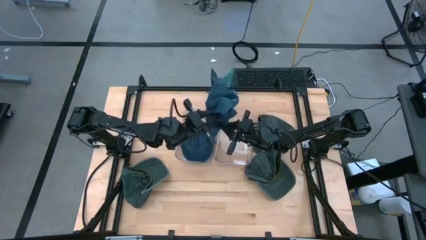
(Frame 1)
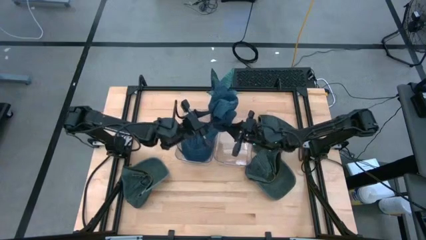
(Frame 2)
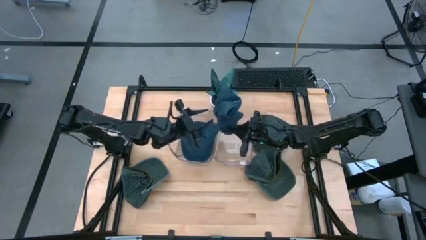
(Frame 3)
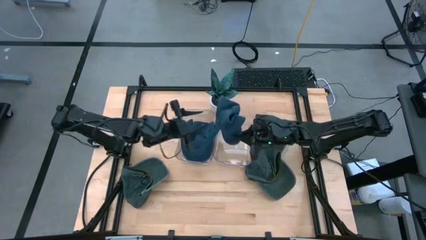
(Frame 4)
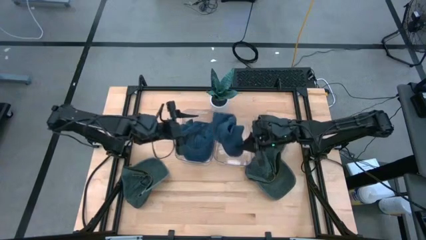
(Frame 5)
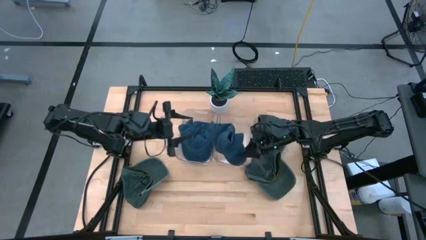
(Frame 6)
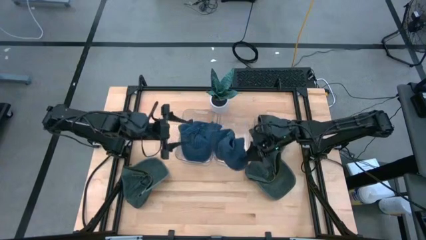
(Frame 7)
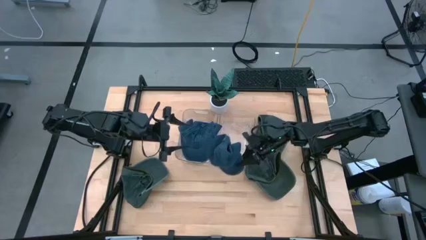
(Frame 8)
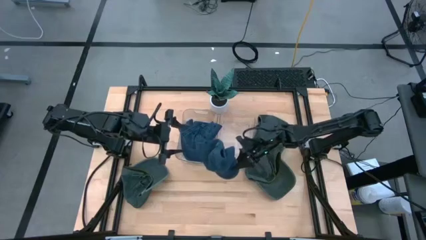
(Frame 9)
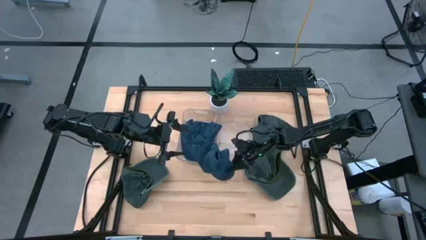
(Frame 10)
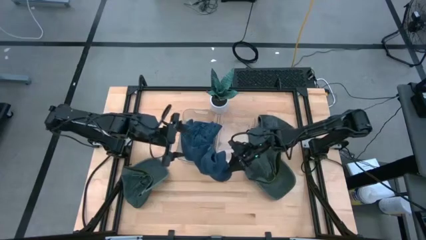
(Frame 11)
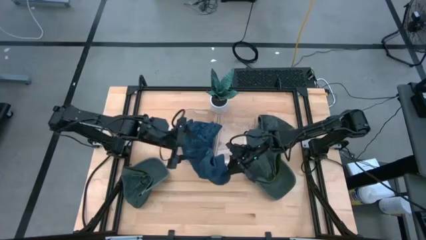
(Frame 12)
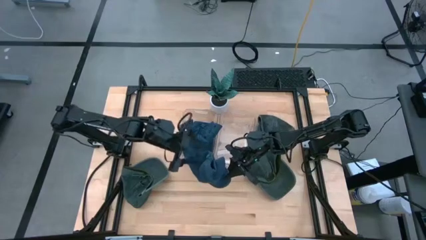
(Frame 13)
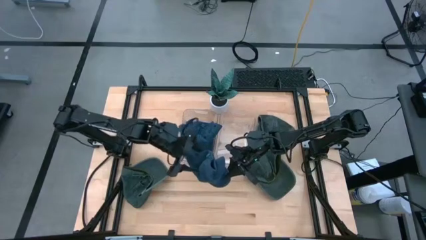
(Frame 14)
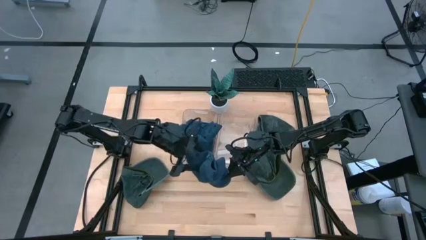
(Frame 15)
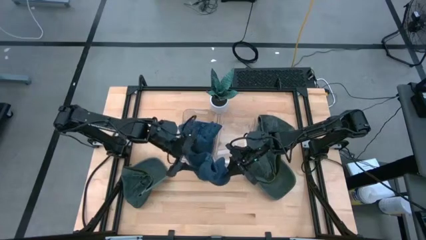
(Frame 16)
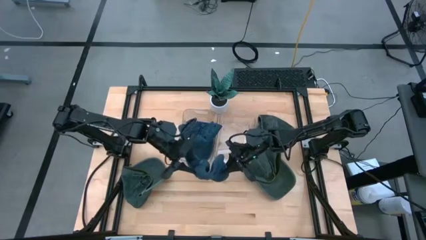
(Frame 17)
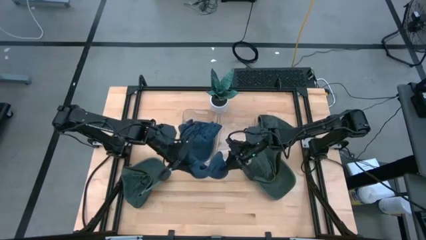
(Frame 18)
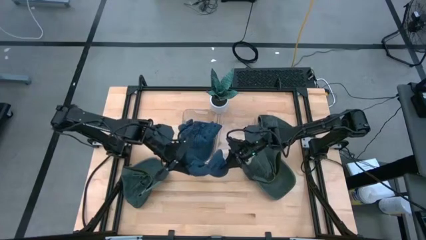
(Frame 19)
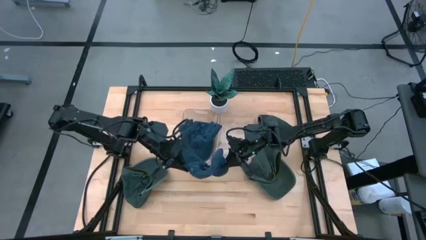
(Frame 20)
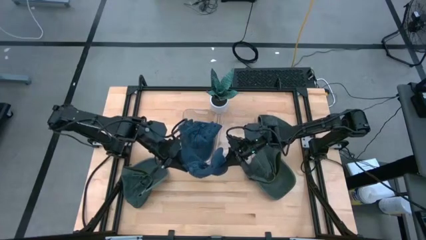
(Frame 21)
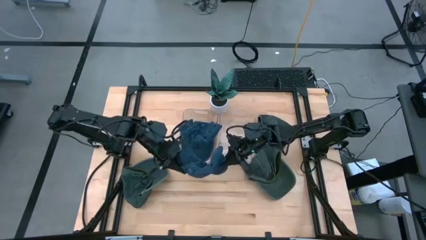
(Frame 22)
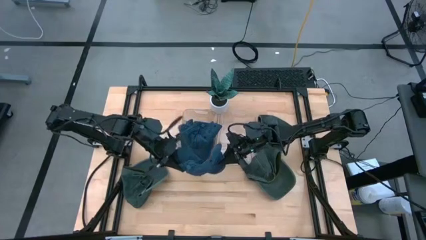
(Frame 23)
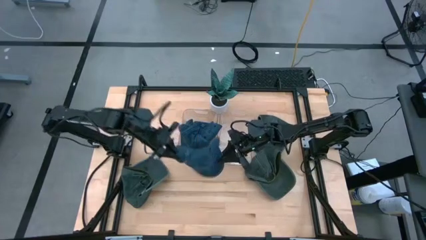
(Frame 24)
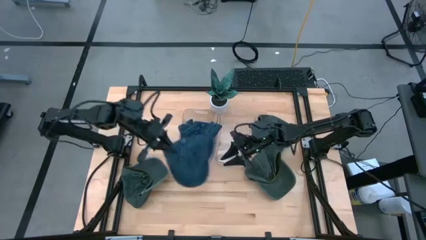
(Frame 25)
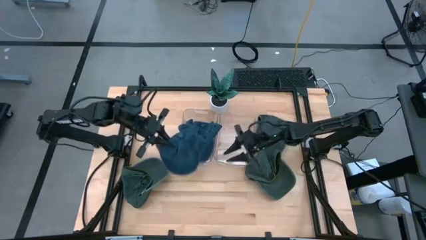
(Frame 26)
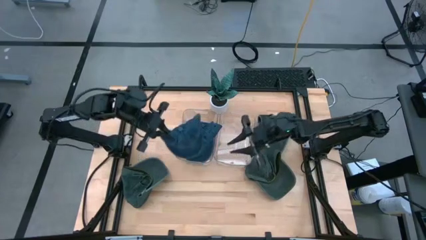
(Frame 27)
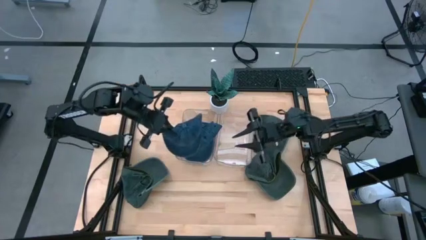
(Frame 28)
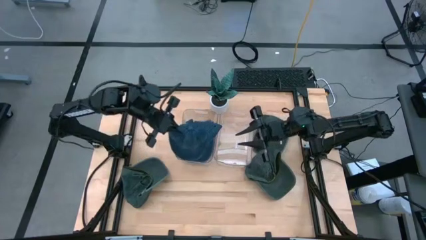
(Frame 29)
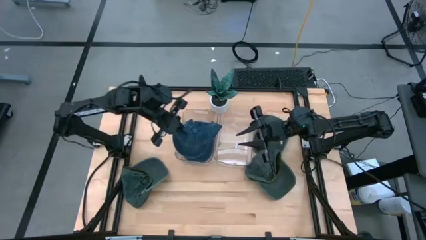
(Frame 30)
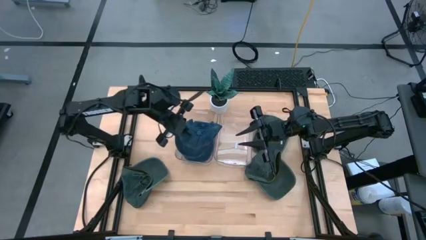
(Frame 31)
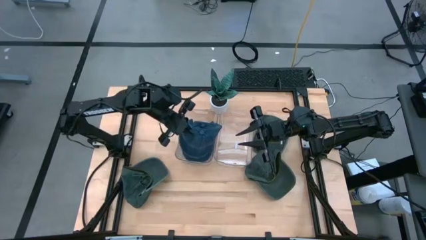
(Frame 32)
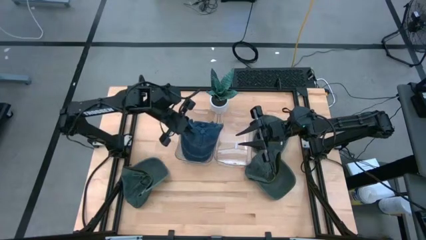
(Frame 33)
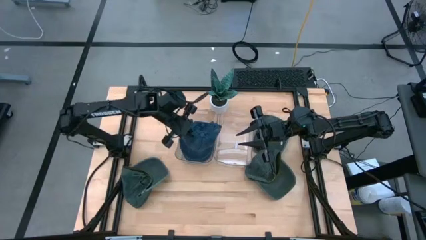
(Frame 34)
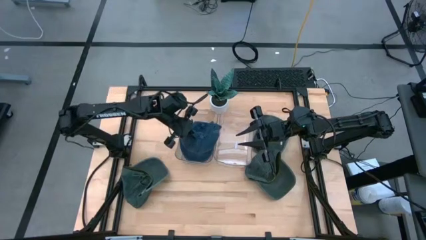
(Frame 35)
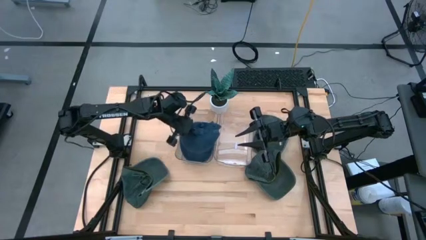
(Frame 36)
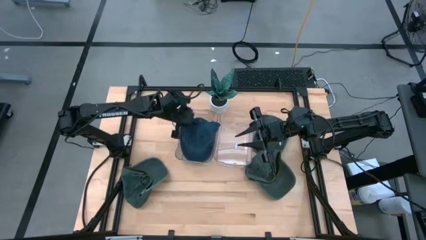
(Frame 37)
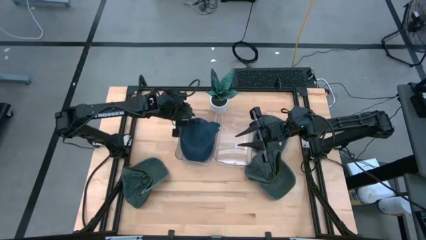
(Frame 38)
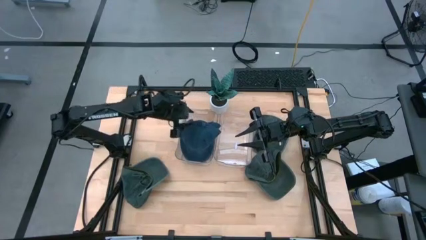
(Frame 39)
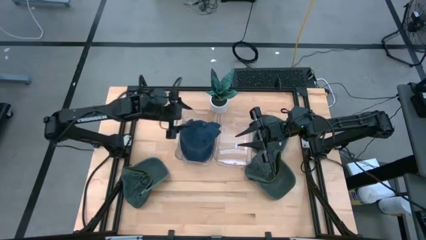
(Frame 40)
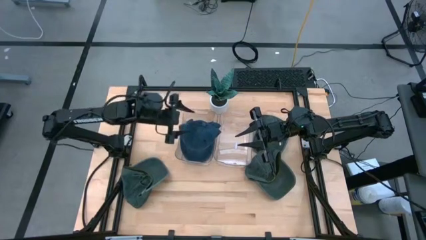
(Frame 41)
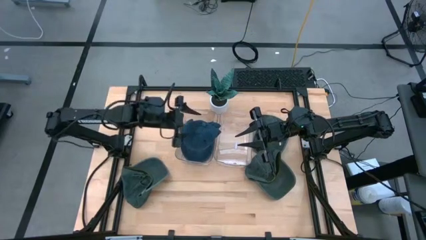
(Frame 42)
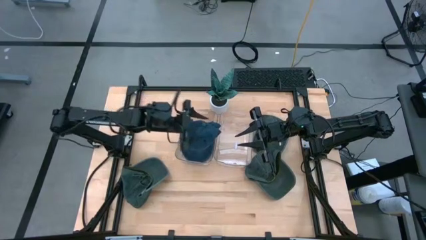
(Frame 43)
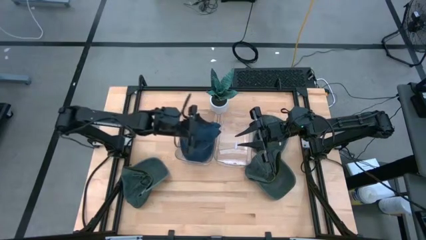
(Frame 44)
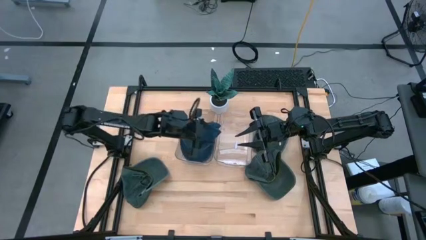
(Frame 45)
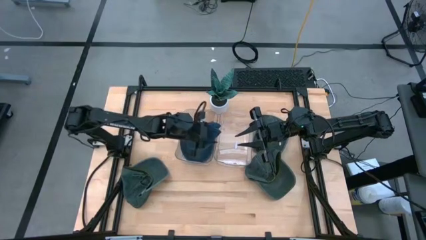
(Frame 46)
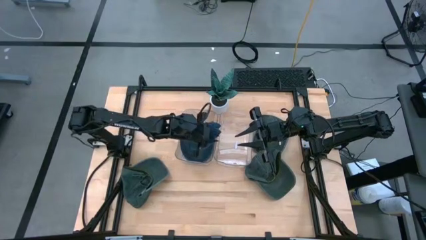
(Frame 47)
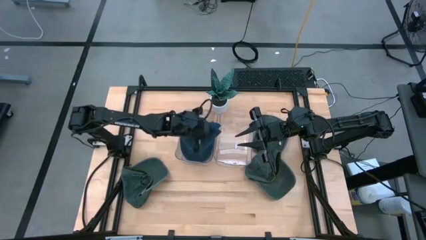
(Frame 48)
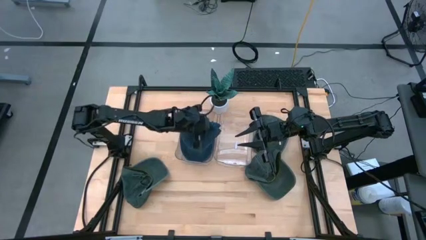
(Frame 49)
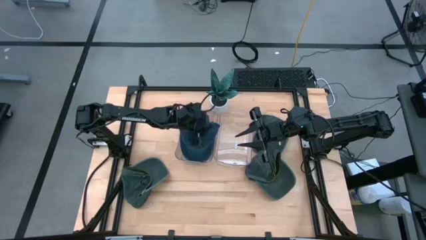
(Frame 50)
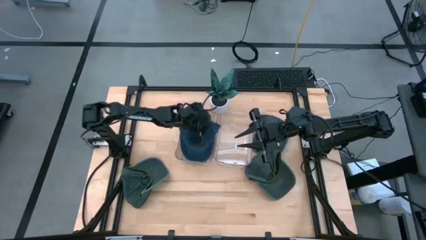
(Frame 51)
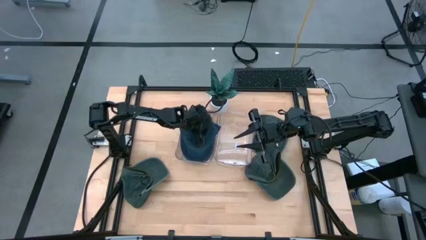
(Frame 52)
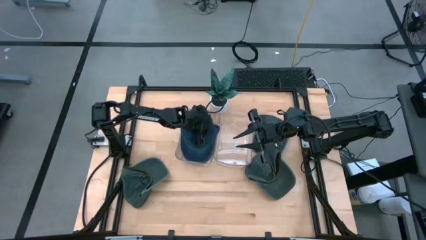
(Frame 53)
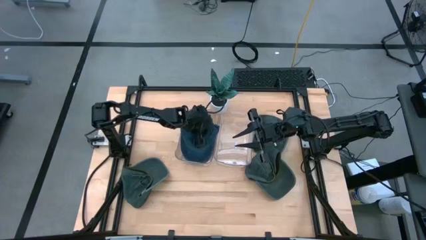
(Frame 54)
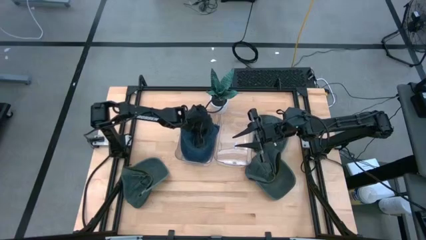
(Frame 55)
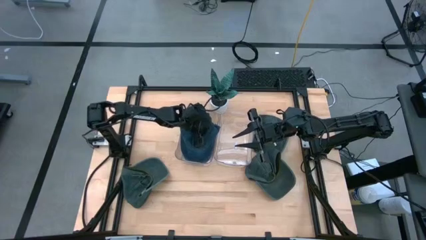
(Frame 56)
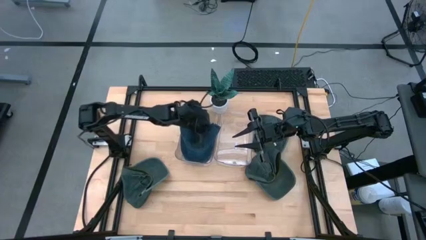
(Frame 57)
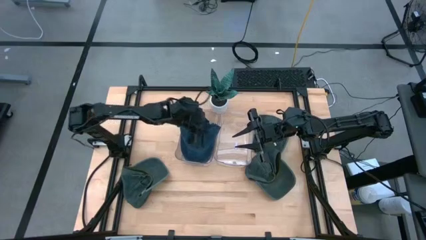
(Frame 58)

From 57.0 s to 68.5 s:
Task: Pick & Place hat
Put the blue cap into the left transparent bin

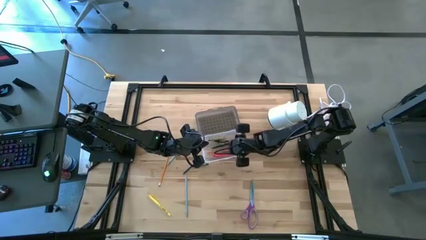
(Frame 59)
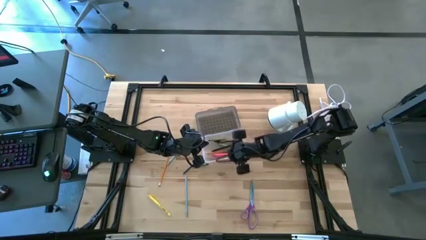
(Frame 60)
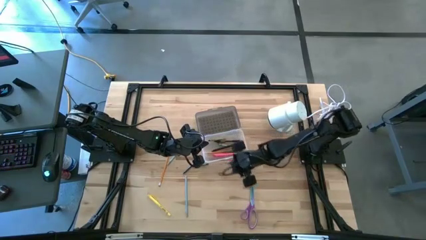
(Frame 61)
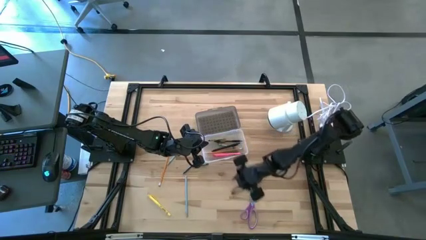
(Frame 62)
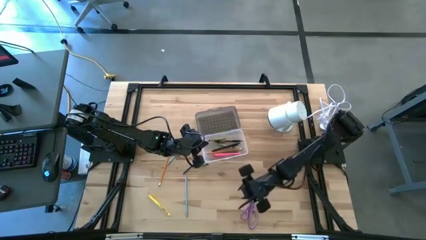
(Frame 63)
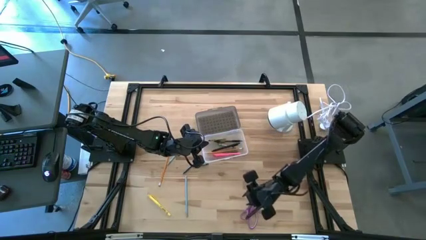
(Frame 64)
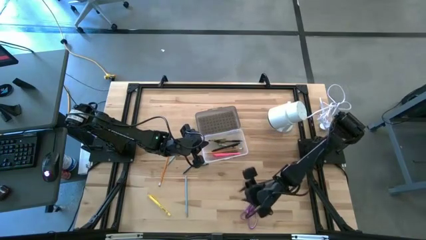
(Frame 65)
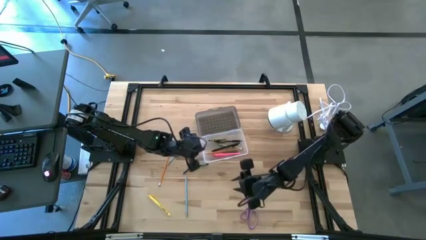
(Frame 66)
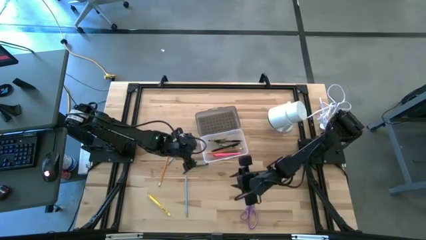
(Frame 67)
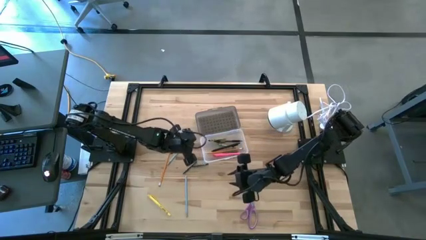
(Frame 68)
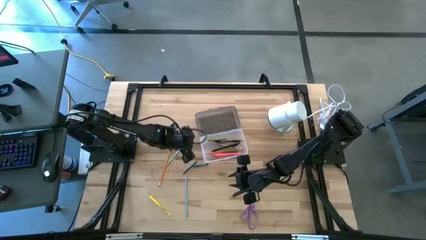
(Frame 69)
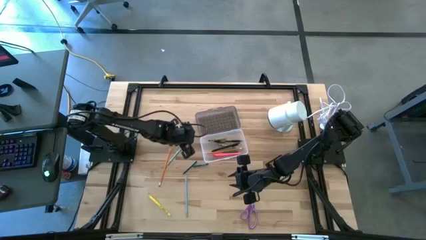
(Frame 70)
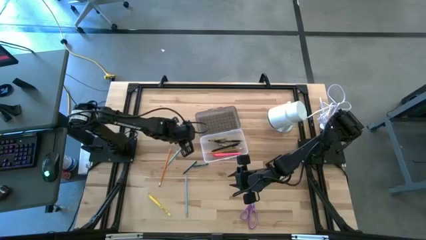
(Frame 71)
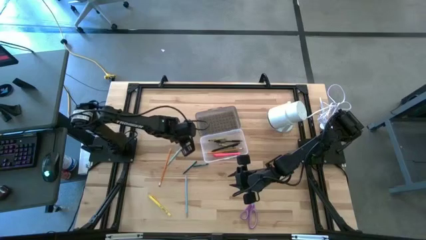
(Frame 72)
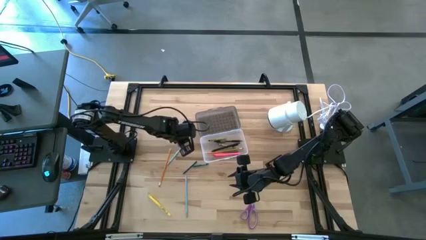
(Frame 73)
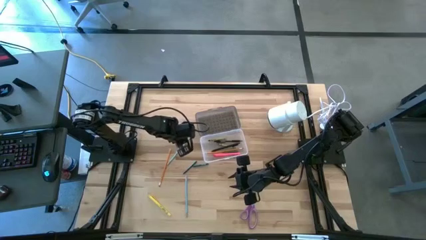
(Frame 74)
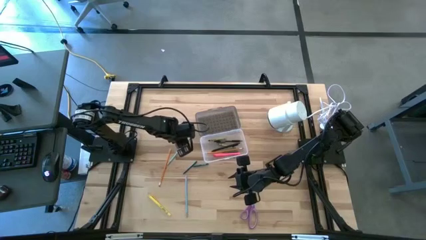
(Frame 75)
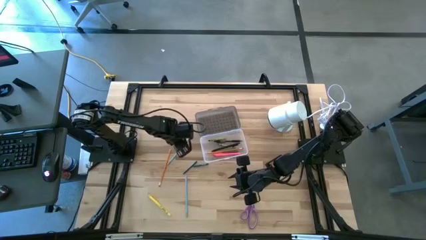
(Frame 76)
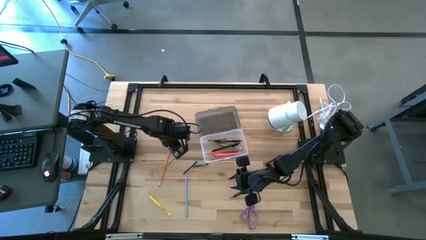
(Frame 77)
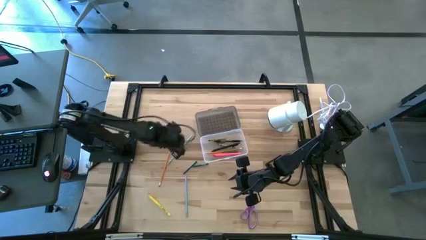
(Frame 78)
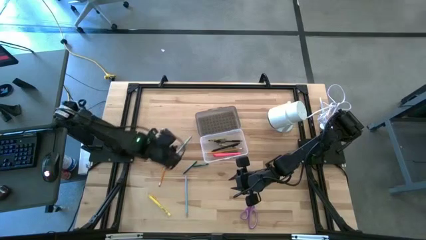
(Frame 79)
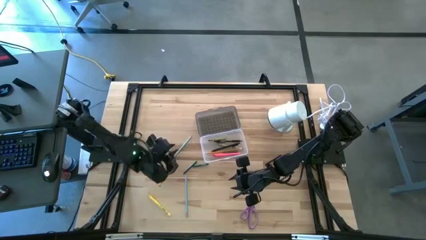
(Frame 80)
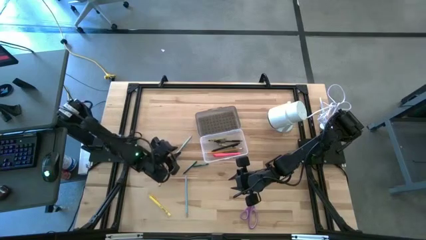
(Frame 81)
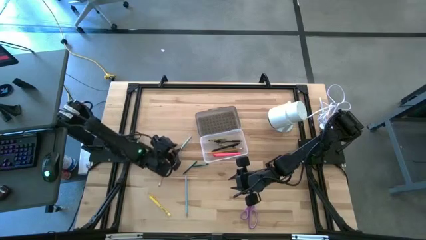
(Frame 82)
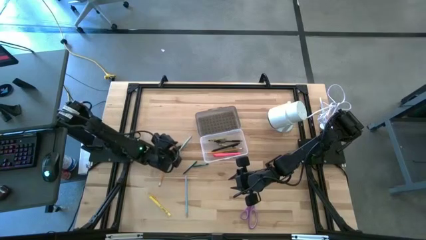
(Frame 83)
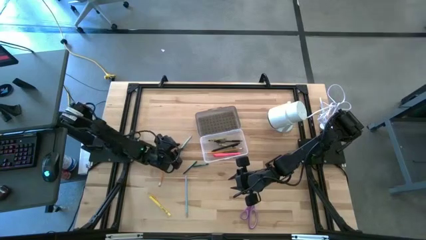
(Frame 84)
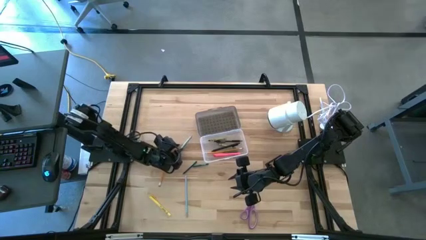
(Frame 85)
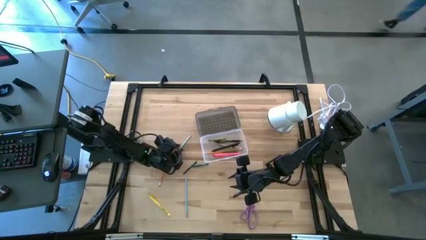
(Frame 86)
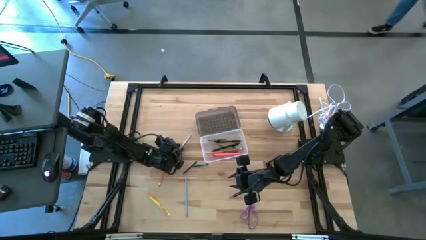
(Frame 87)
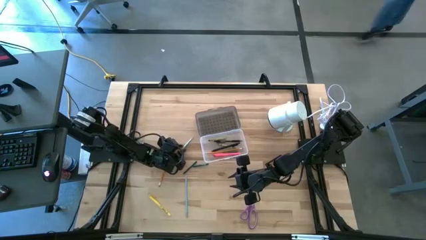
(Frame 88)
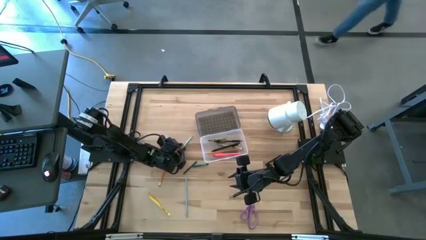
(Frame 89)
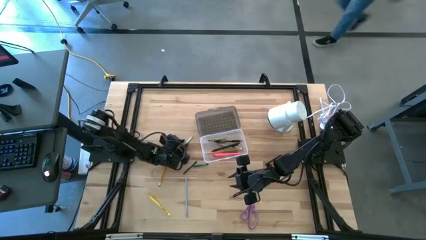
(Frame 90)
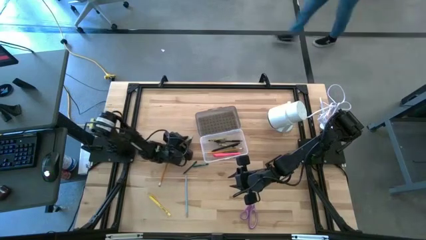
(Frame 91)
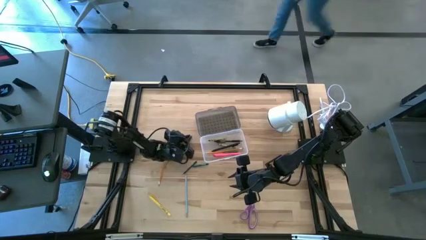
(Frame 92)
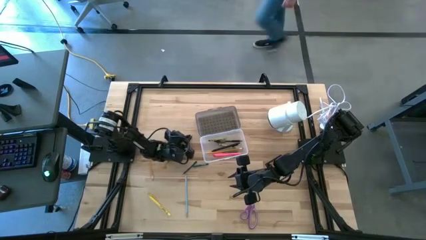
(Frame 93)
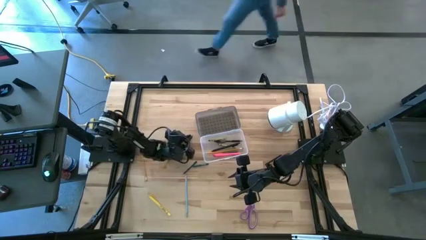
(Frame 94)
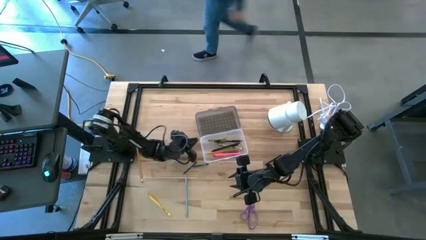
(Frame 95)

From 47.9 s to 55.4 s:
Task: Pick & place school supplies into a supply box
Put the light blue pencil into the gray supply box
